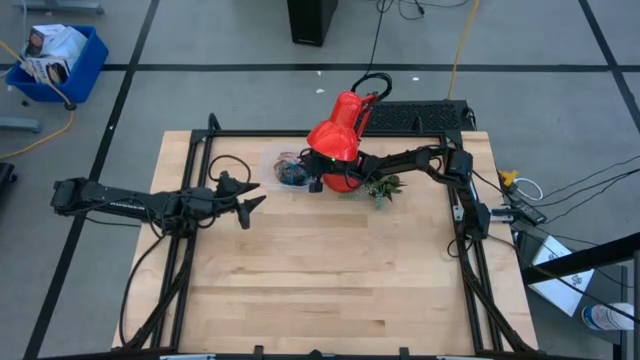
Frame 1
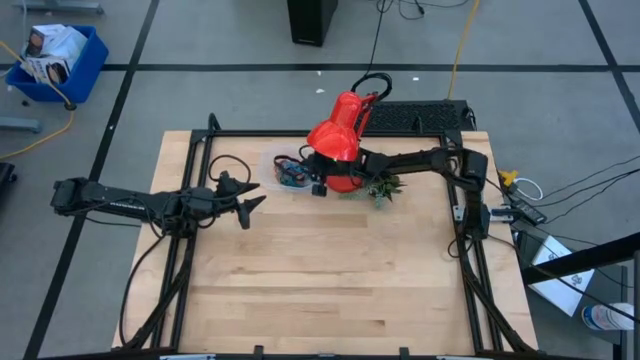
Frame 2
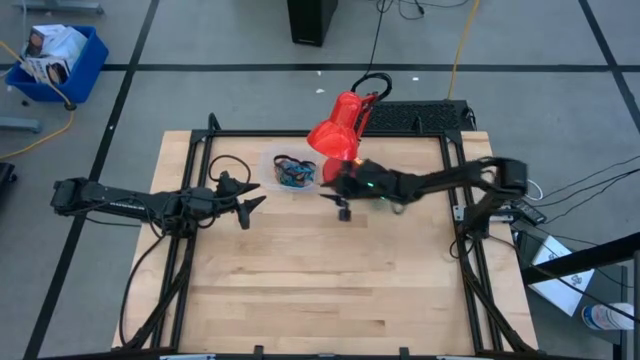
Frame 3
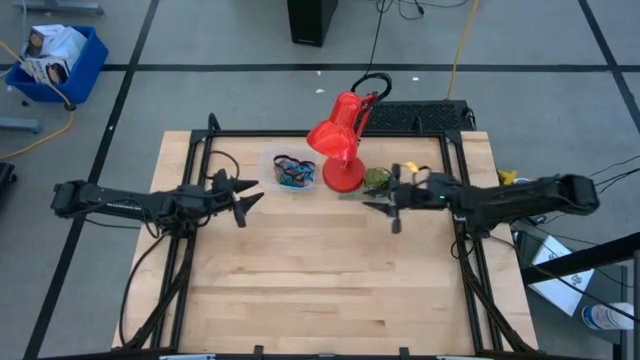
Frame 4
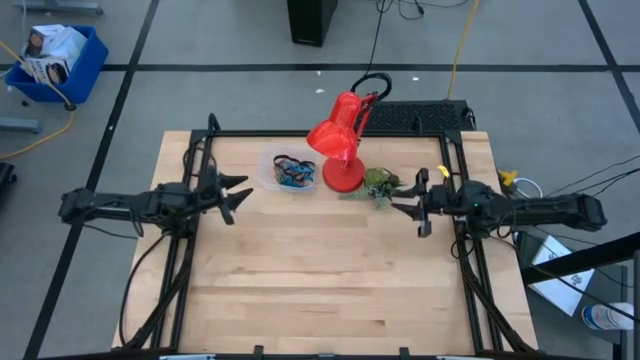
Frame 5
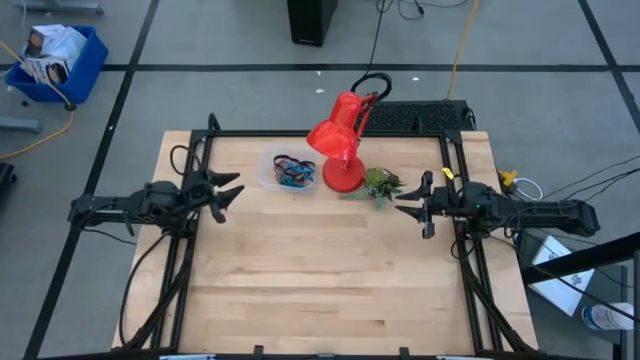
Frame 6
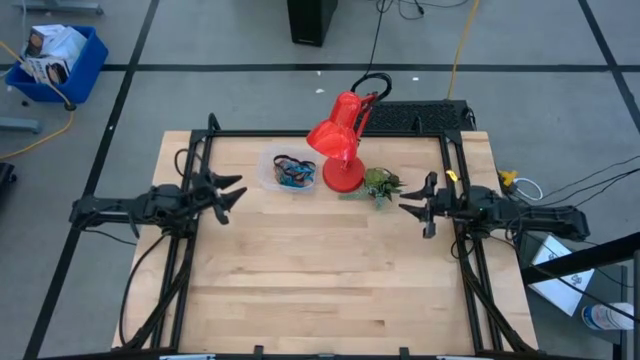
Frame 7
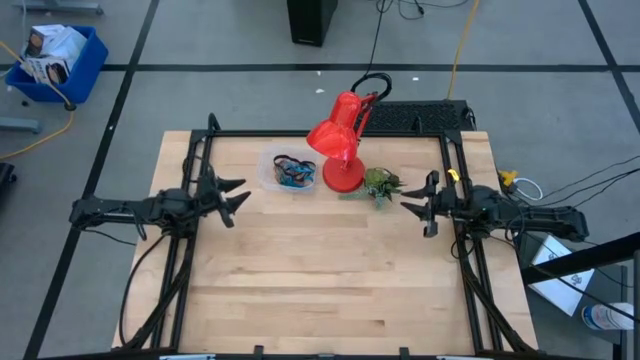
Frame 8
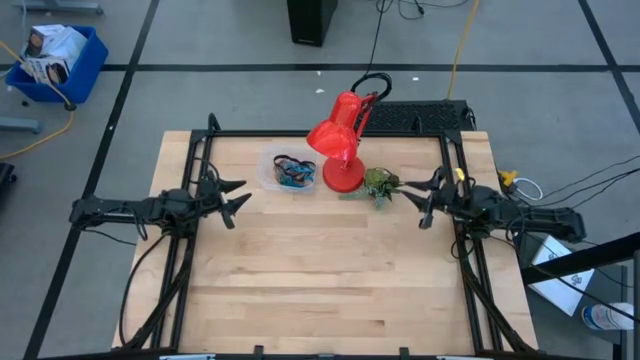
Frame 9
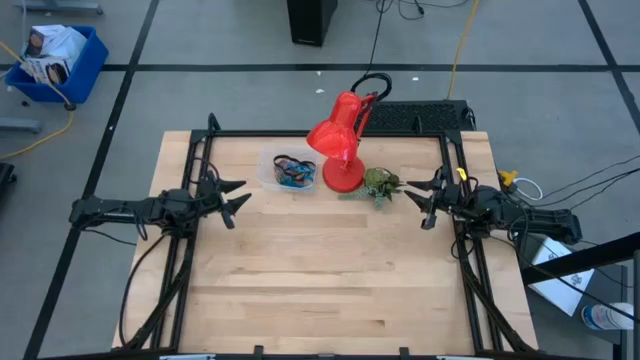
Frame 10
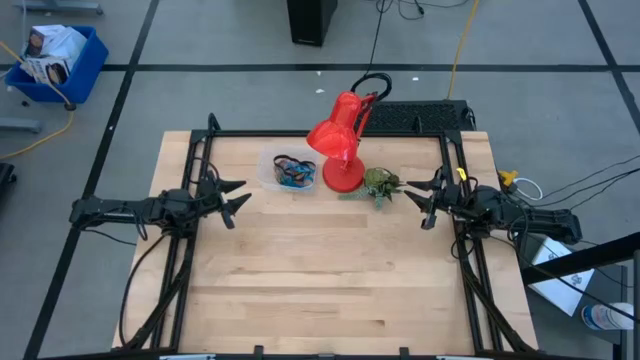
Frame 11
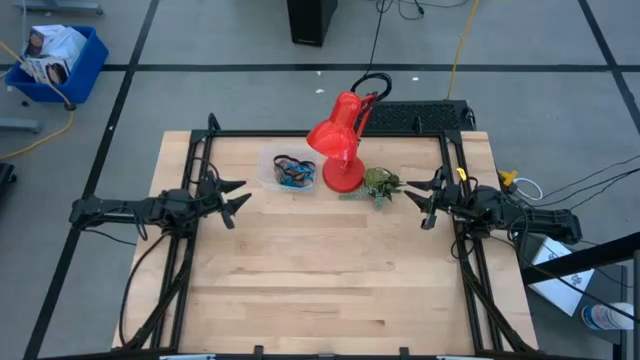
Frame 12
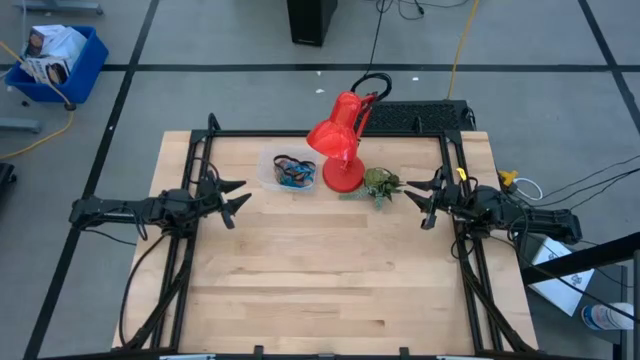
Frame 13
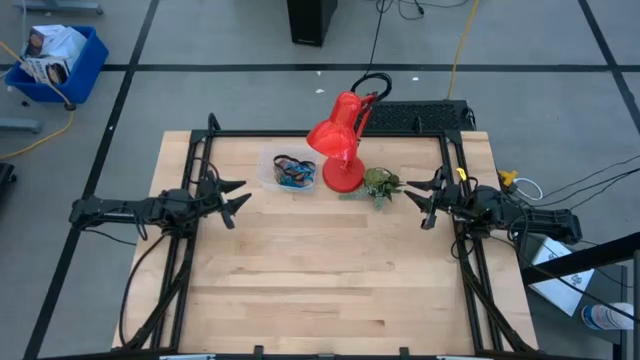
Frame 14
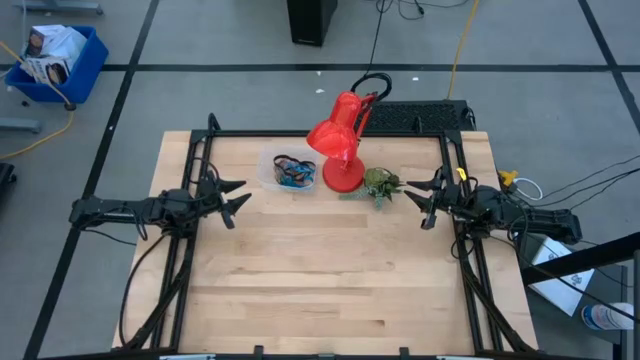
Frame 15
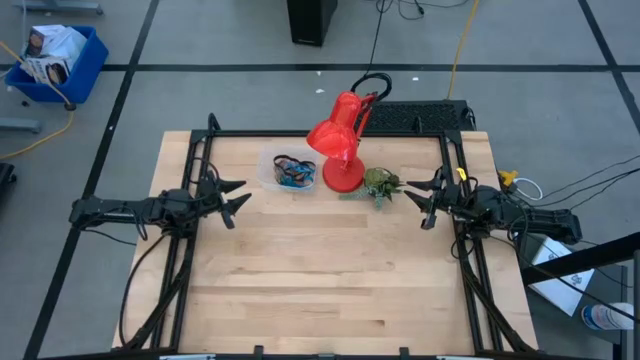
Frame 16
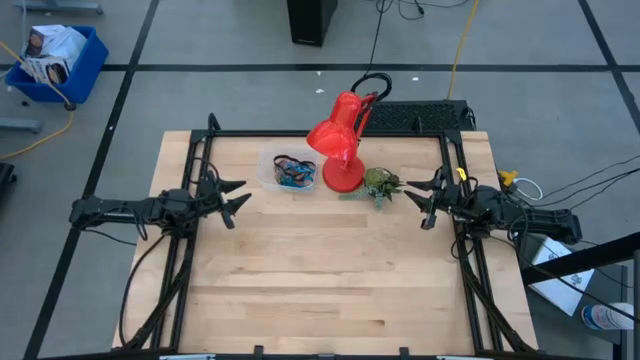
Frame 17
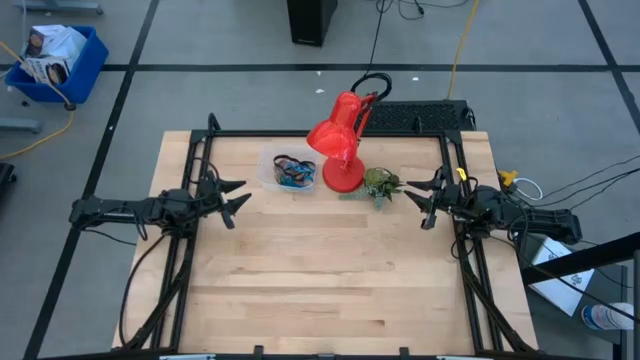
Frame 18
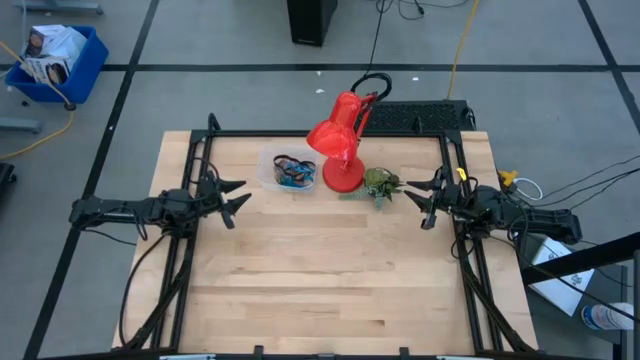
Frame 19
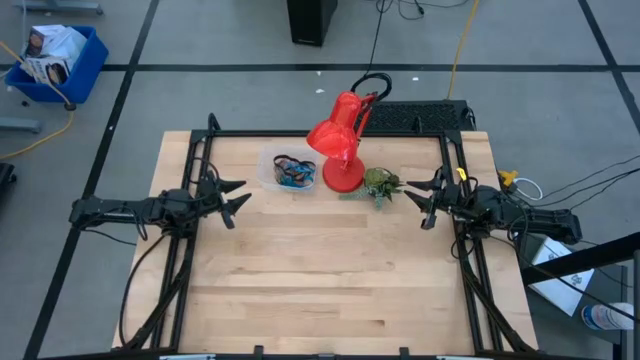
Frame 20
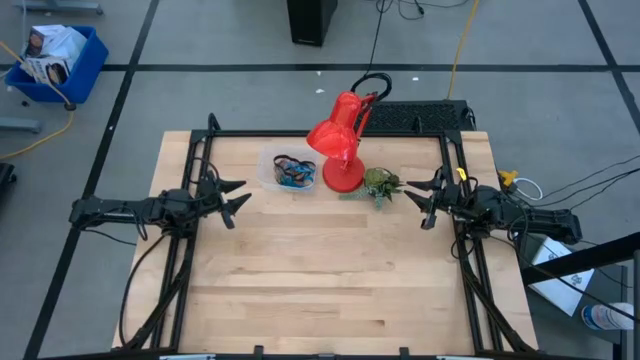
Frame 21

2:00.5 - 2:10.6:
Task: Pick and place rubber bands into bin
Return to Home Position

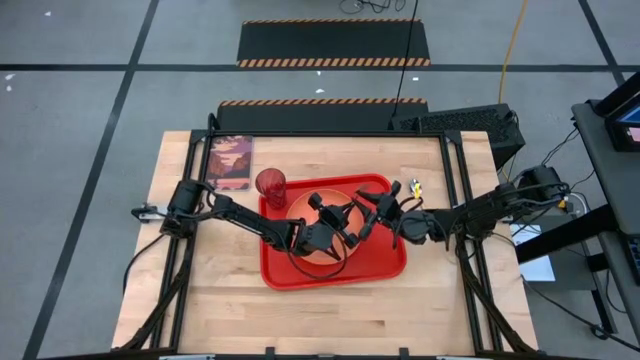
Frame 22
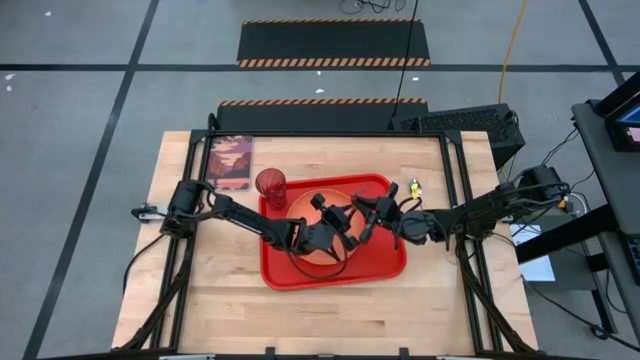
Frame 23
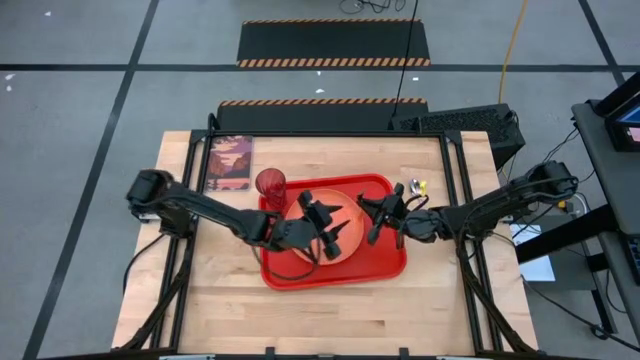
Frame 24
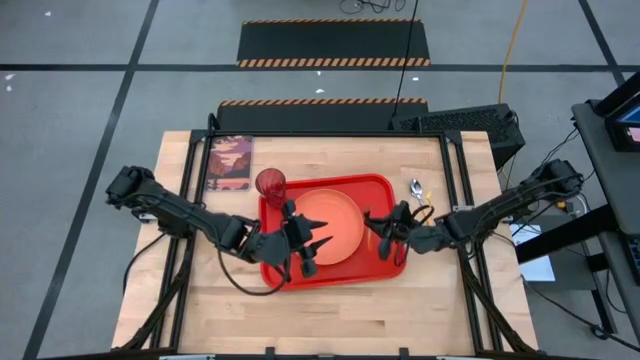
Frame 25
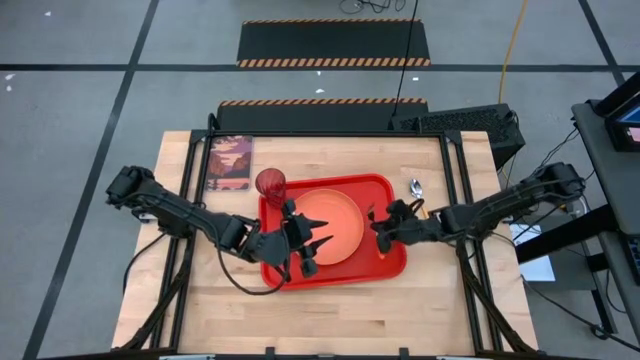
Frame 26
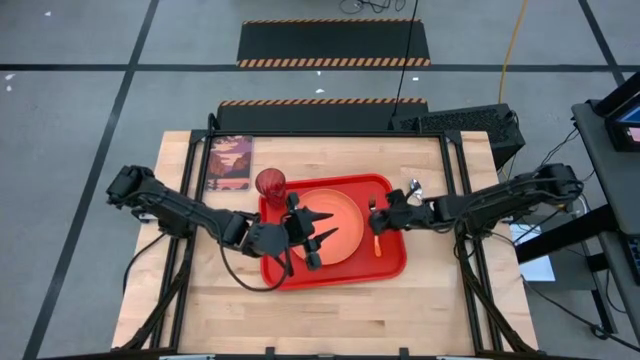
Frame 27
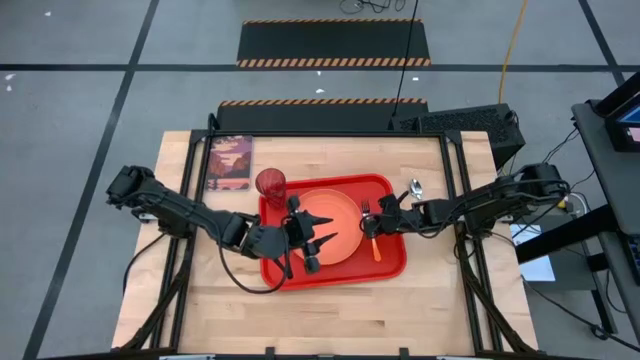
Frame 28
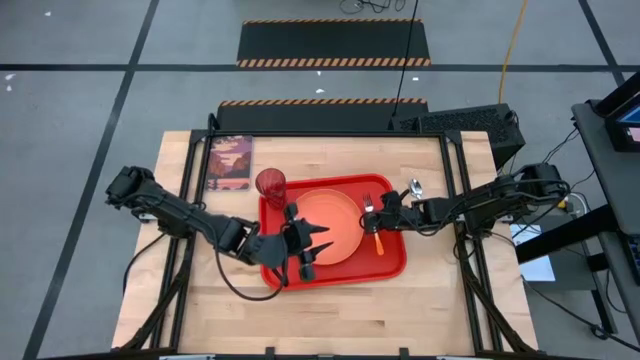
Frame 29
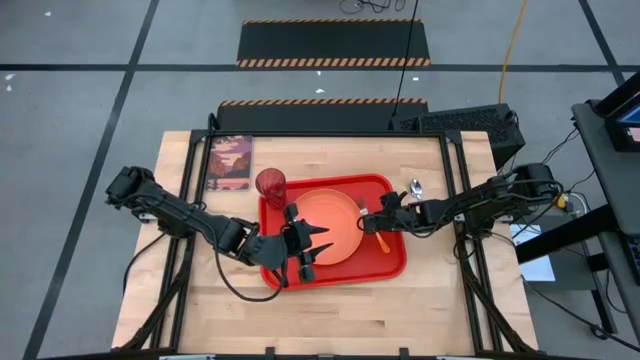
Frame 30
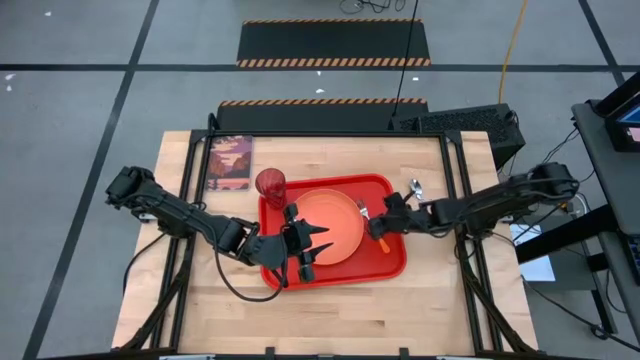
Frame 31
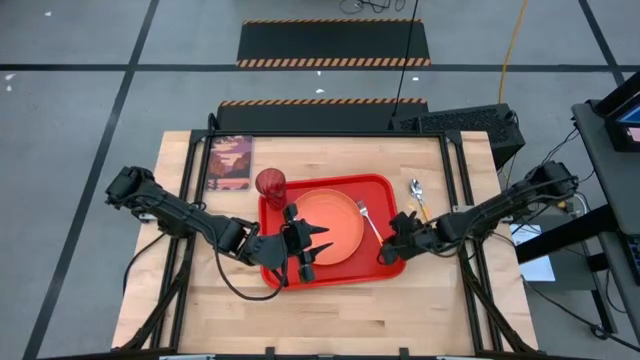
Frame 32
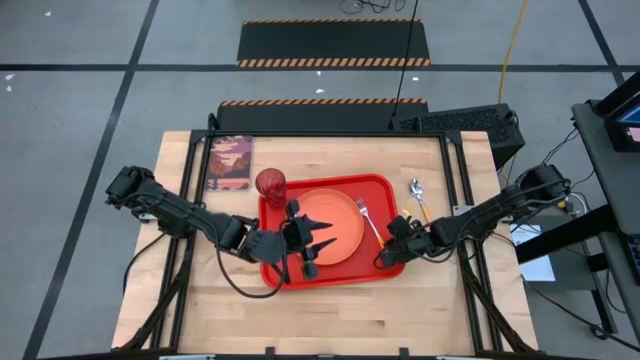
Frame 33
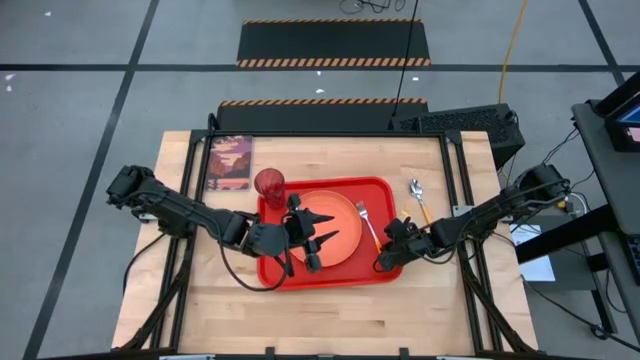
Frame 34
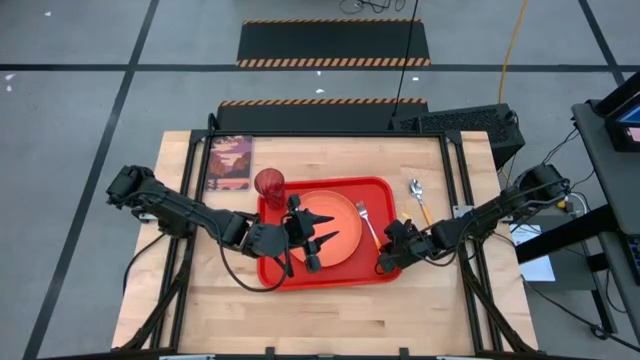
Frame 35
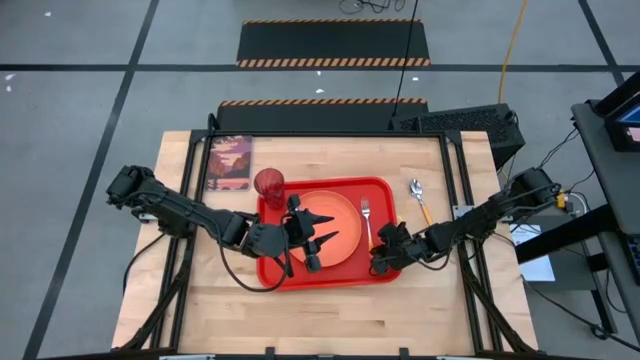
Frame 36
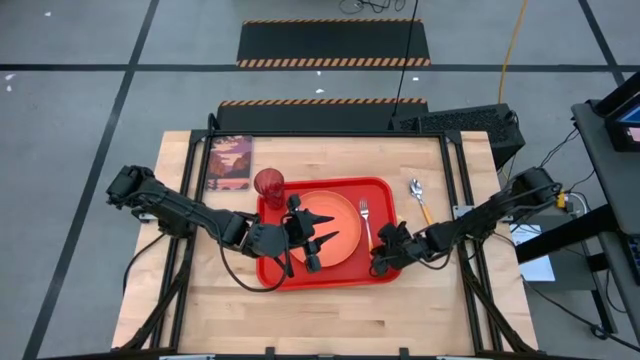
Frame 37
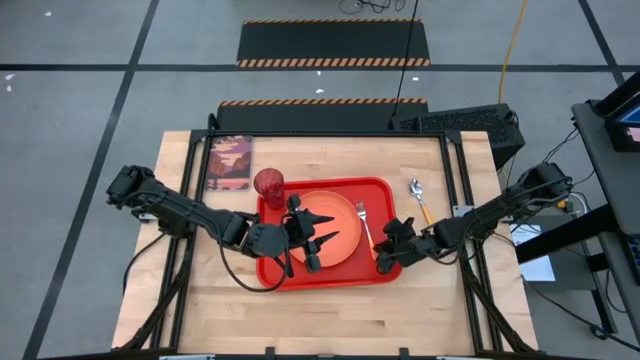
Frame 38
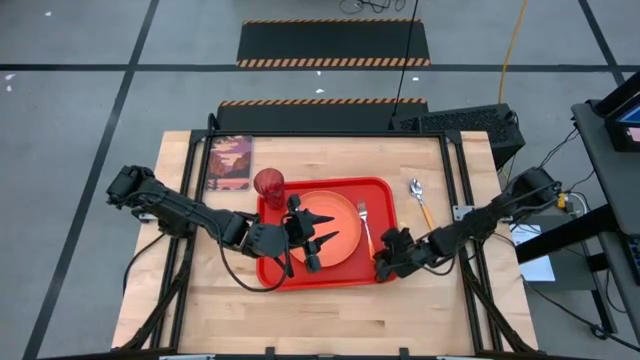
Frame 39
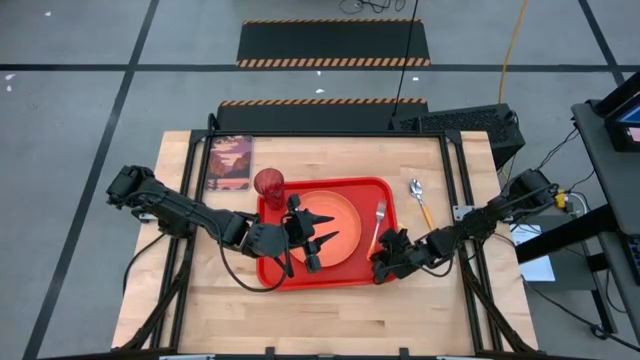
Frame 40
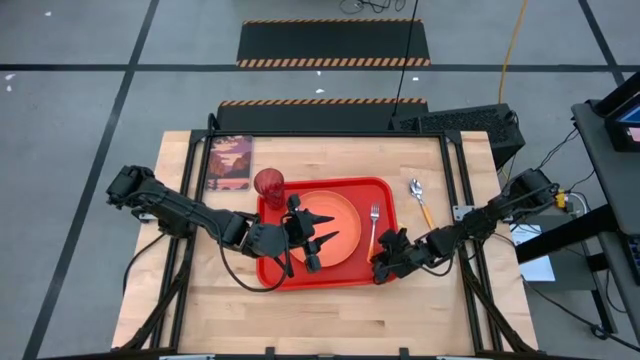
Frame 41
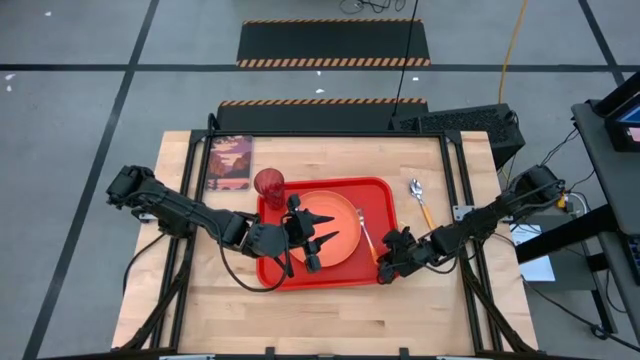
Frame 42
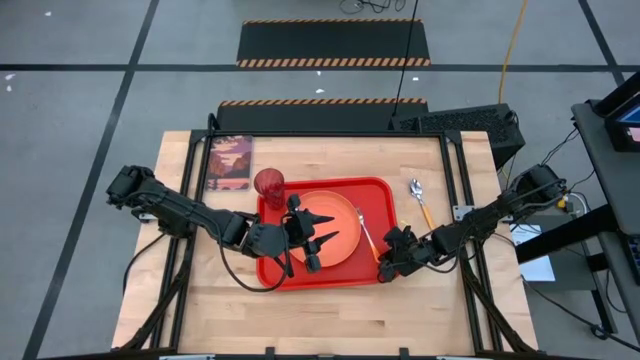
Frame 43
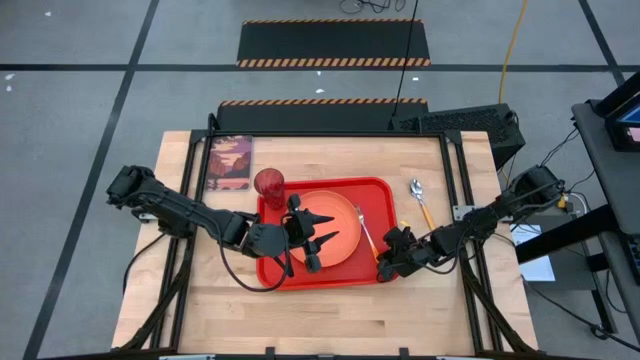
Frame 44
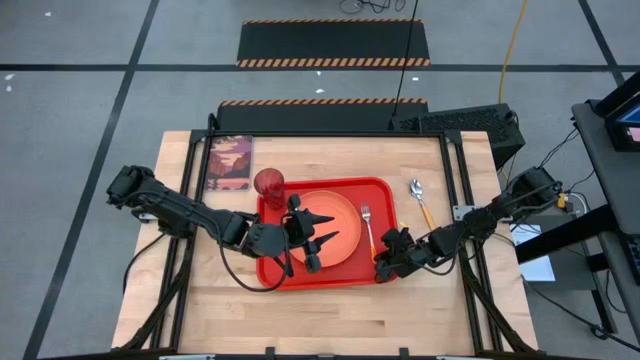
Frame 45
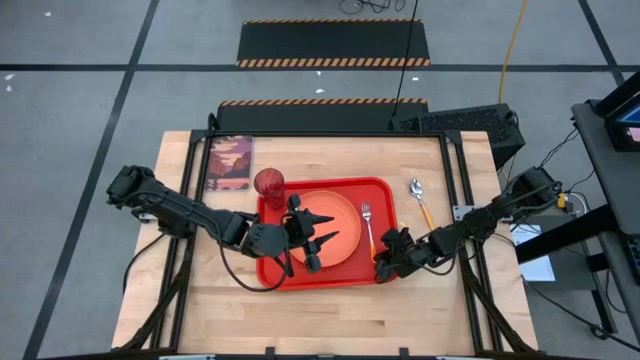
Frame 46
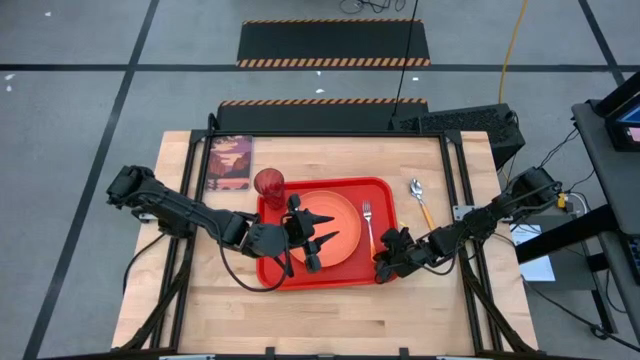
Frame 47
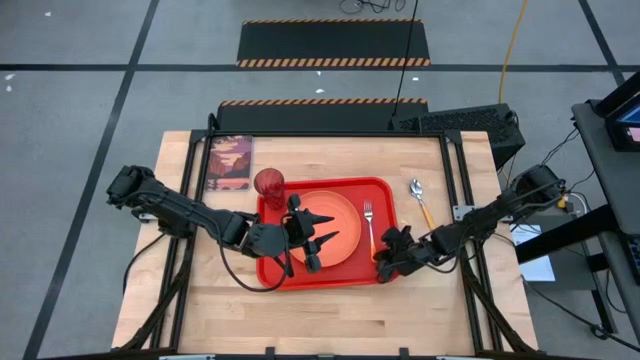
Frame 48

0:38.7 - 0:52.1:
Task: Pick and place plate/cup/fork/spoon on tray
Put the white orange fork on the right side of the orange plate
